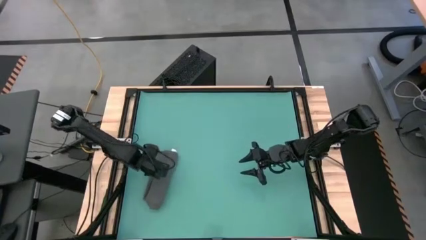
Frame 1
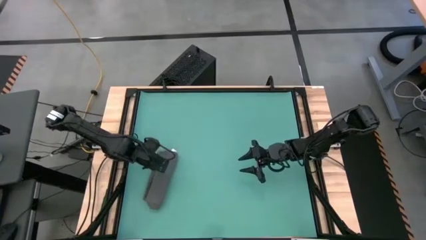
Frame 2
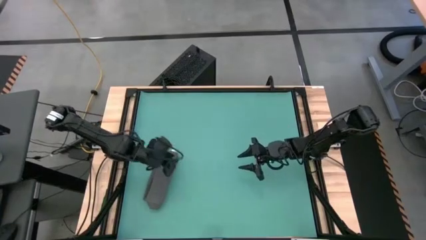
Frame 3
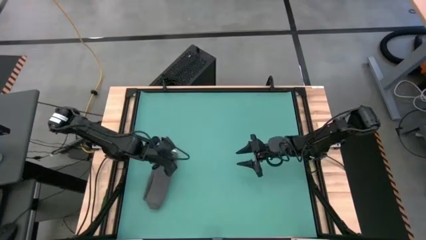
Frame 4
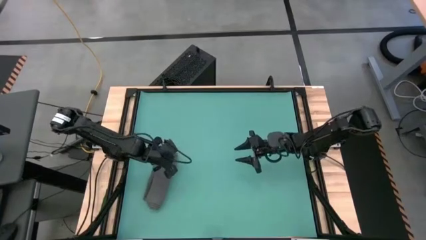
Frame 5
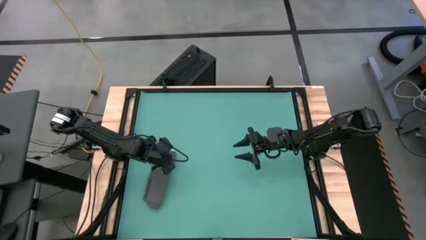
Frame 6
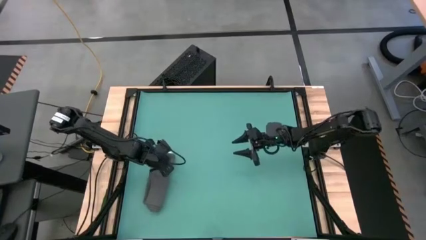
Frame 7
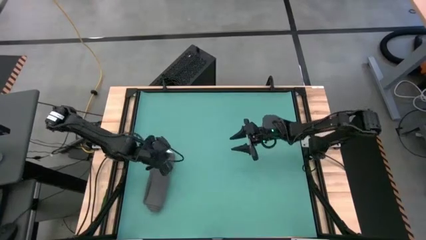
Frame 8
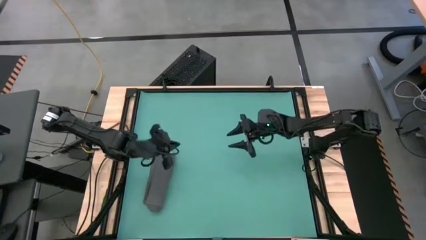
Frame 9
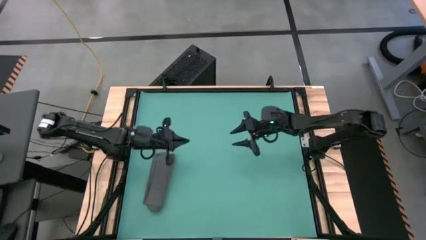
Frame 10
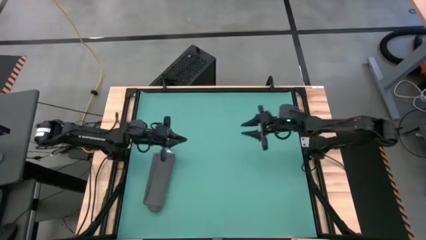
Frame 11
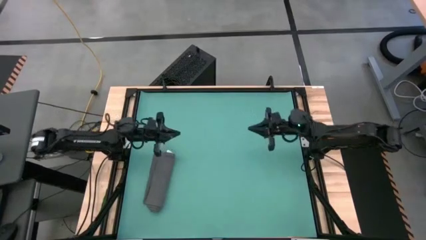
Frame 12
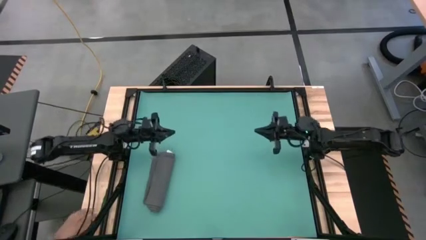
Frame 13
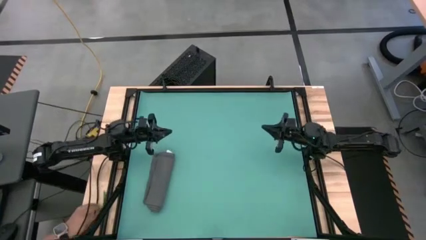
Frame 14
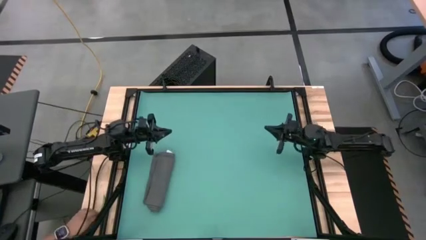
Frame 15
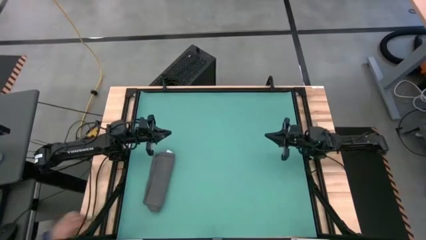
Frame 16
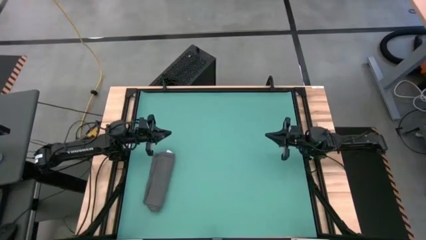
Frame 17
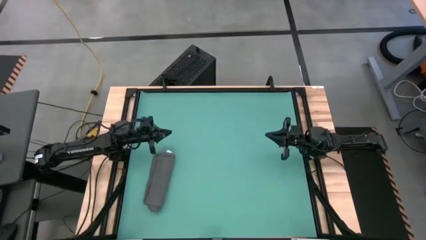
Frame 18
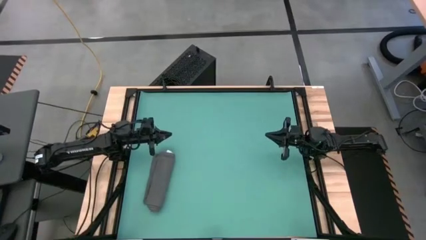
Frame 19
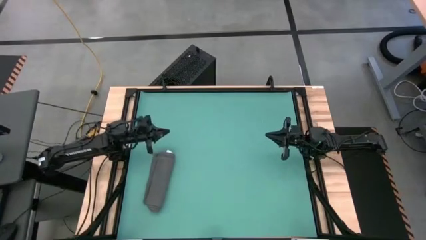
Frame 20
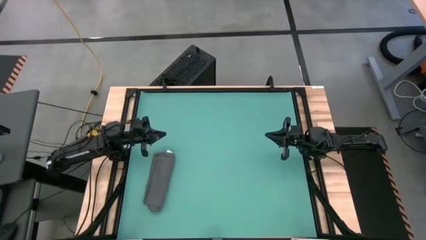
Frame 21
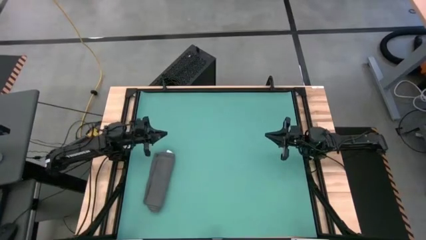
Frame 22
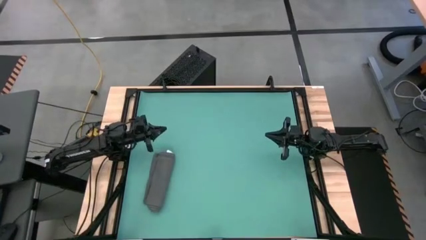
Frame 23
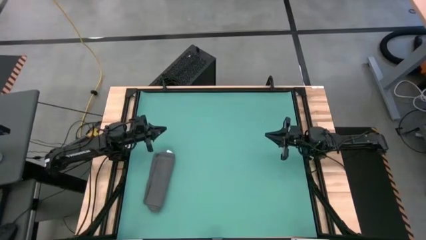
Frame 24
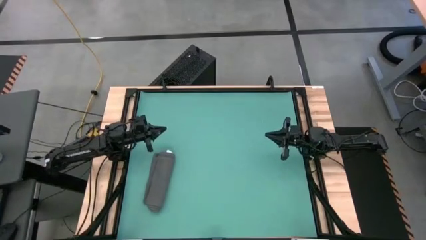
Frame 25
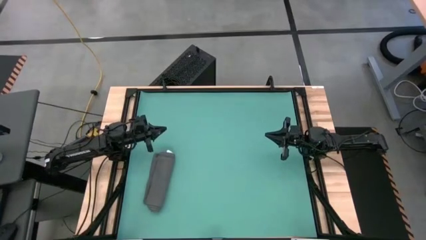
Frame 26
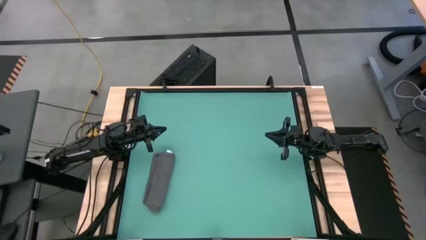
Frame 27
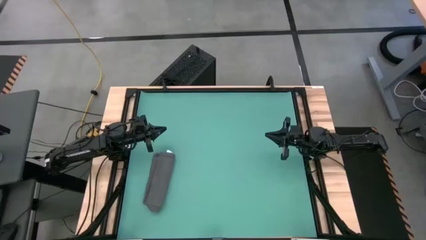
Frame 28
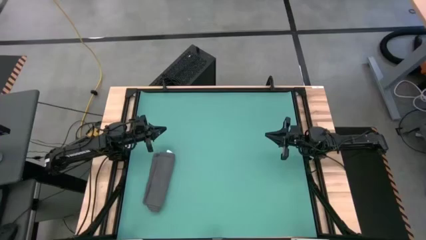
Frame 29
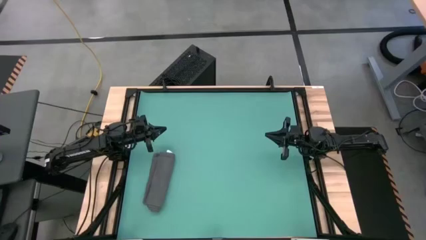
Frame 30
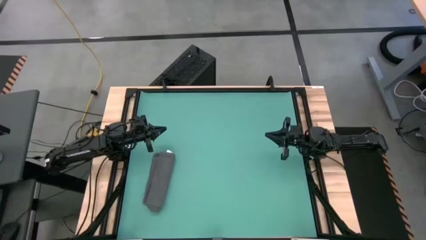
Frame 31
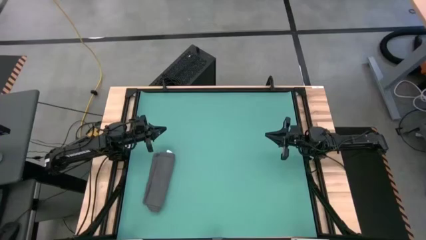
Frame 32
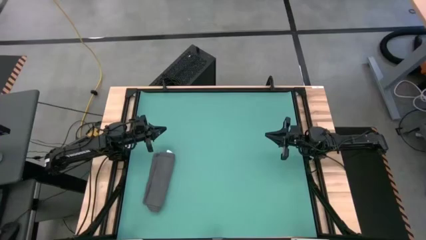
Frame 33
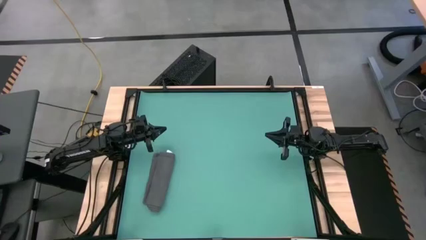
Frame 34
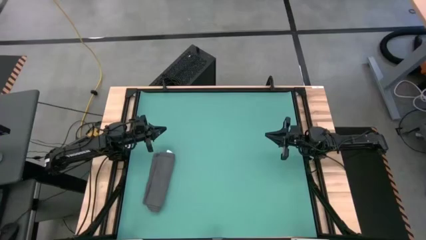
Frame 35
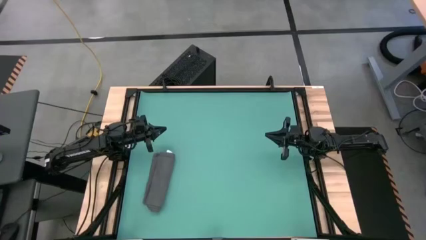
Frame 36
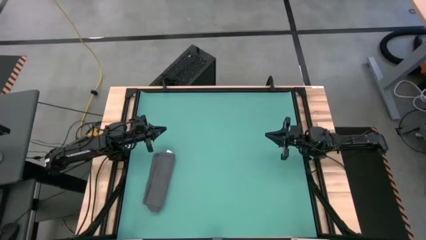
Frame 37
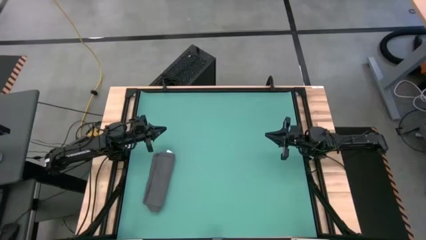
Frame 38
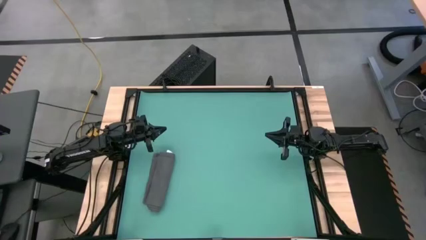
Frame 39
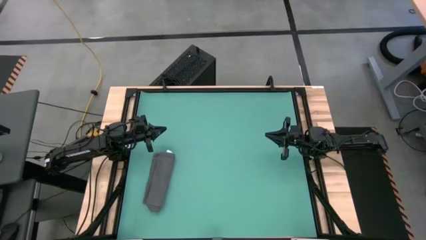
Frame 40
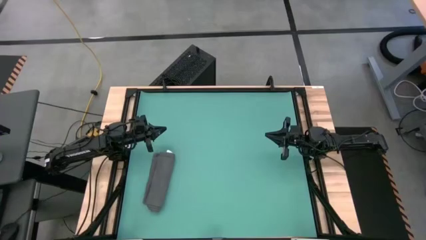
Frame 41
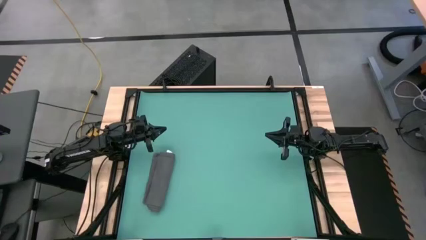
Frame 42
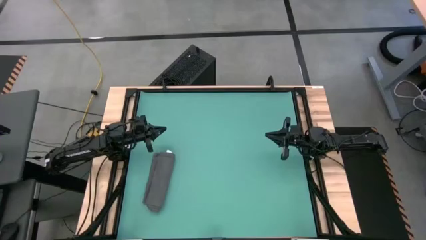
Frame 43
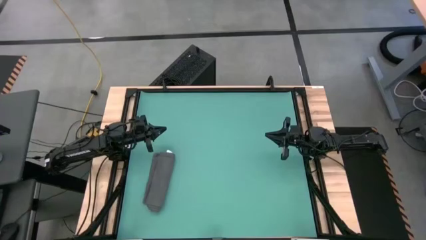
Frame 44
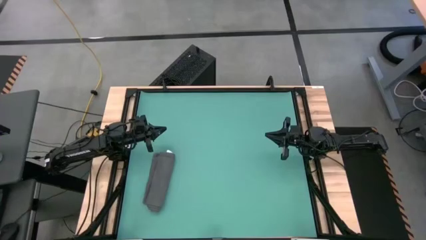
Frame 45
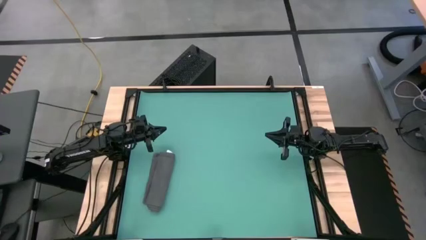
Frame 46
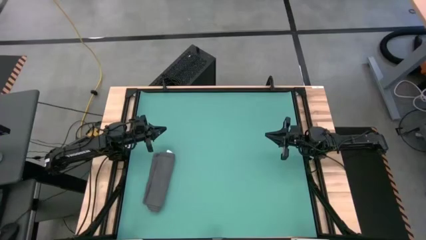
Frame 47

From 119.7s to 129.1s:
Task: Roll towel into tight, uniform cylinder
Return to Home Position

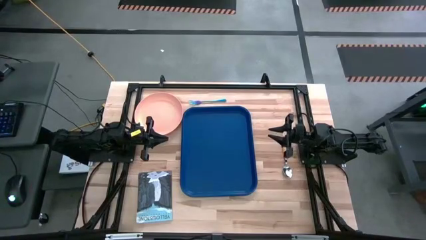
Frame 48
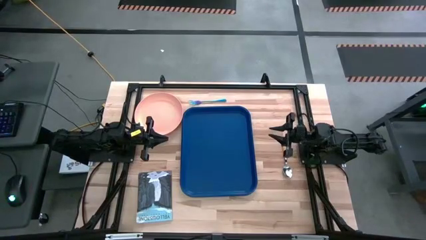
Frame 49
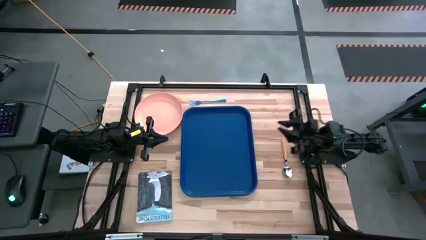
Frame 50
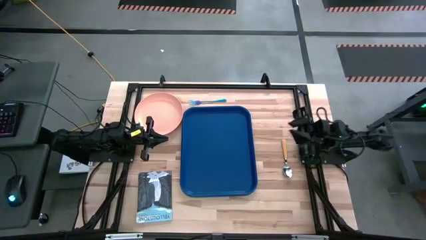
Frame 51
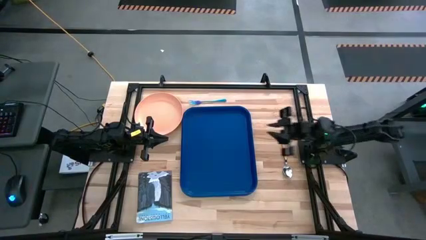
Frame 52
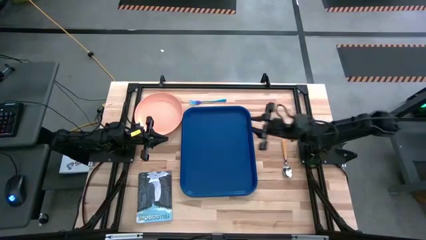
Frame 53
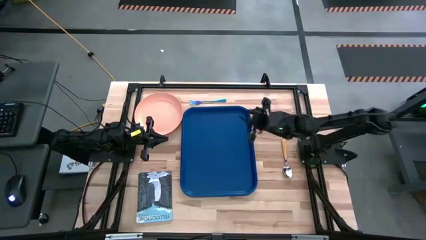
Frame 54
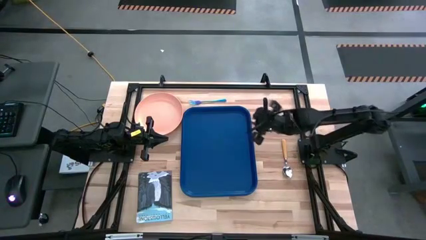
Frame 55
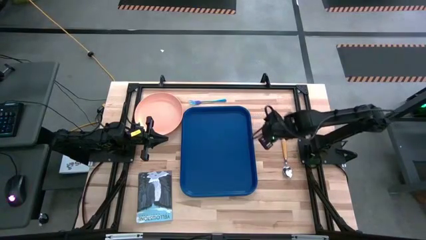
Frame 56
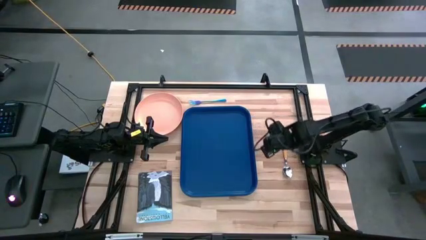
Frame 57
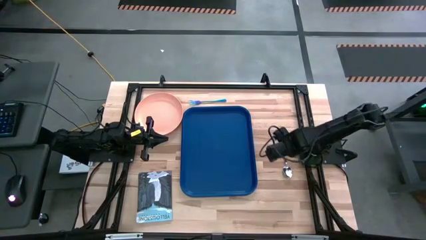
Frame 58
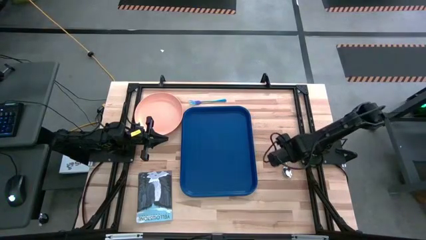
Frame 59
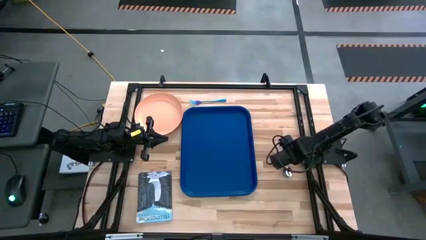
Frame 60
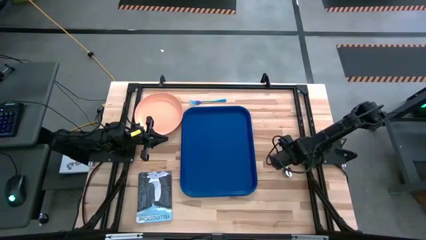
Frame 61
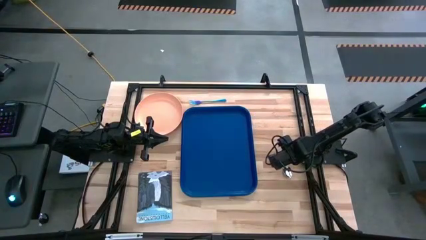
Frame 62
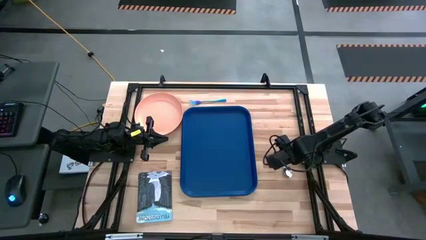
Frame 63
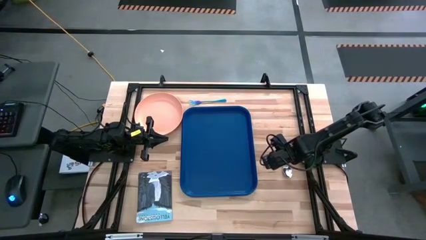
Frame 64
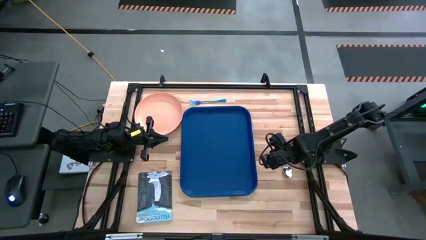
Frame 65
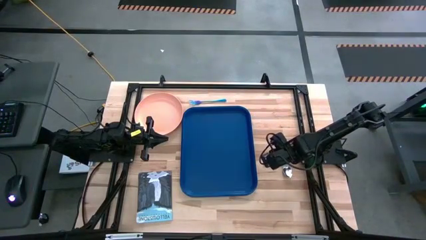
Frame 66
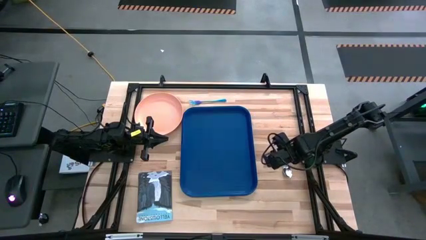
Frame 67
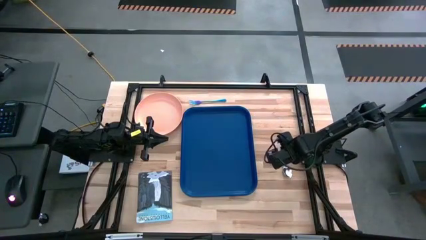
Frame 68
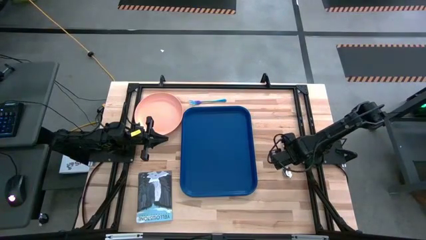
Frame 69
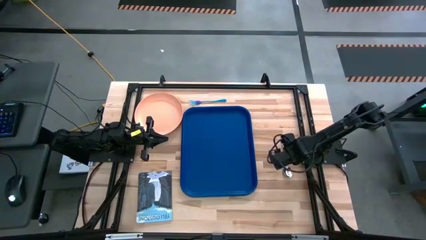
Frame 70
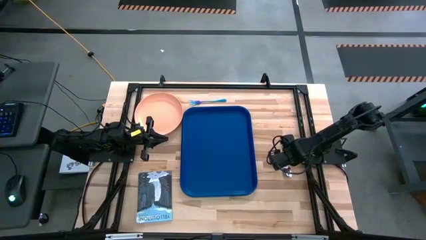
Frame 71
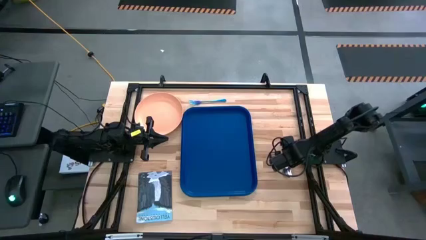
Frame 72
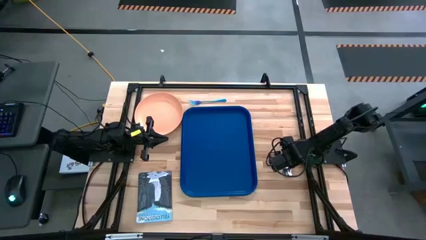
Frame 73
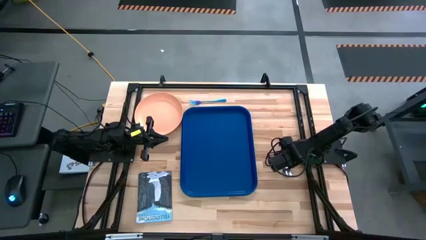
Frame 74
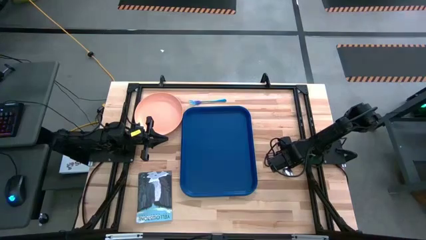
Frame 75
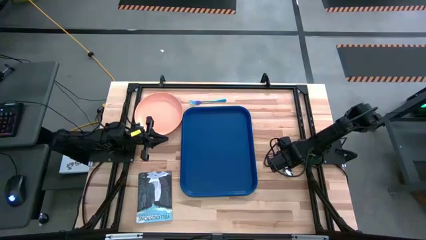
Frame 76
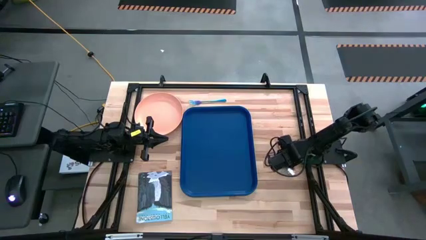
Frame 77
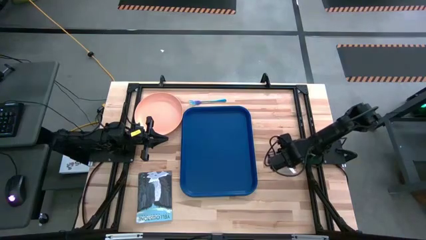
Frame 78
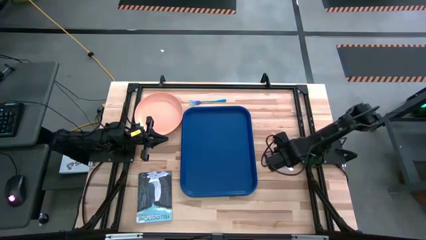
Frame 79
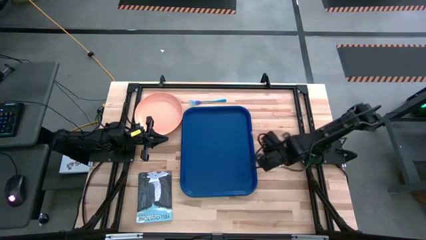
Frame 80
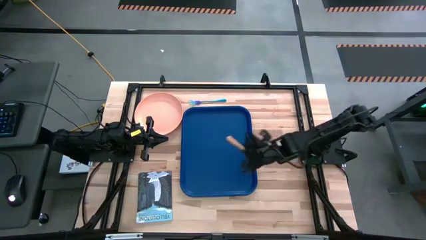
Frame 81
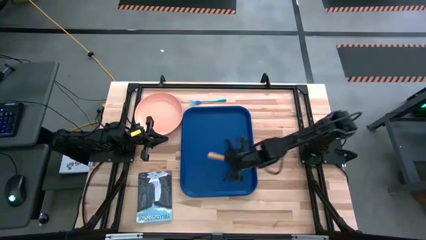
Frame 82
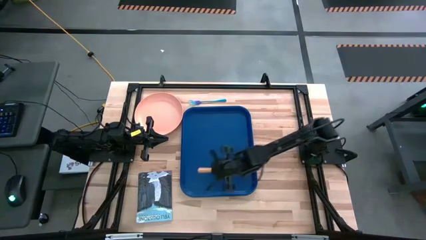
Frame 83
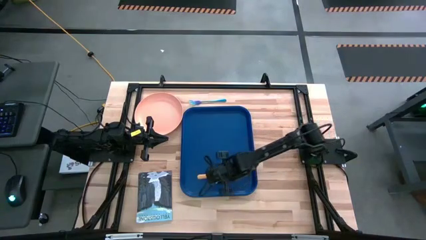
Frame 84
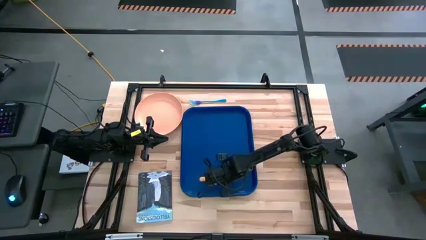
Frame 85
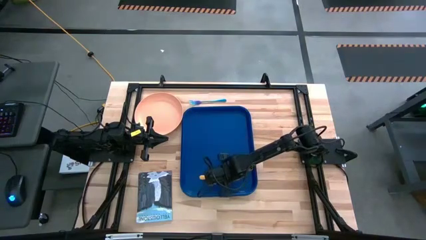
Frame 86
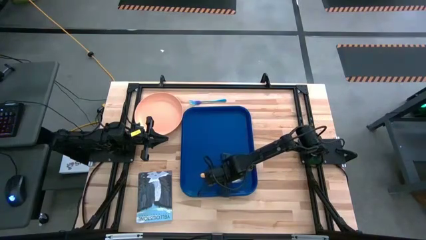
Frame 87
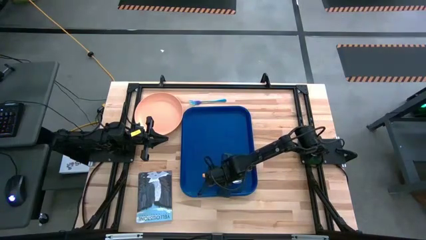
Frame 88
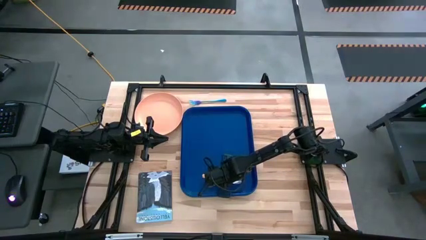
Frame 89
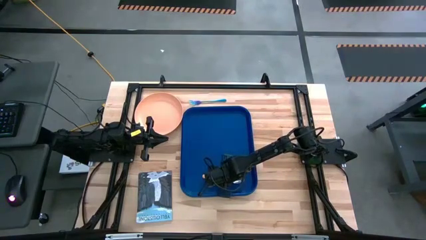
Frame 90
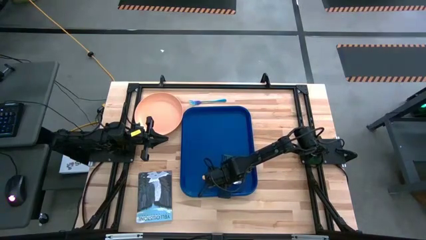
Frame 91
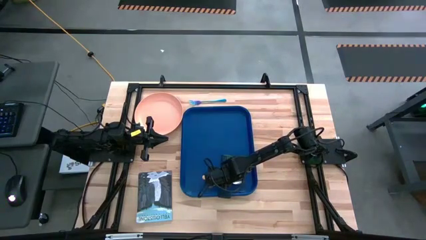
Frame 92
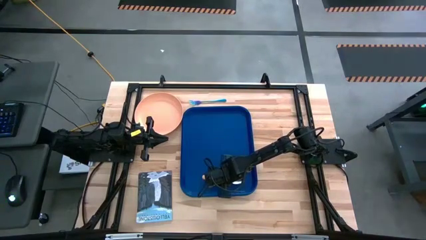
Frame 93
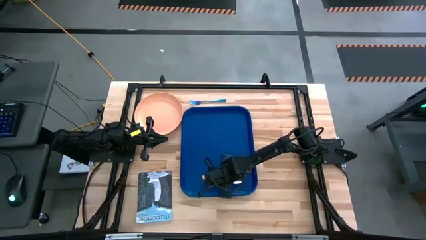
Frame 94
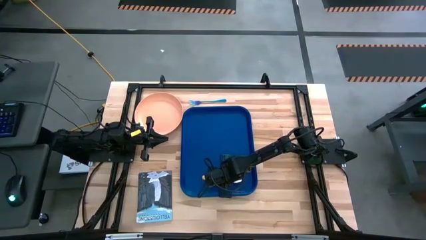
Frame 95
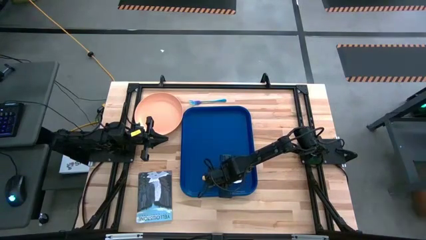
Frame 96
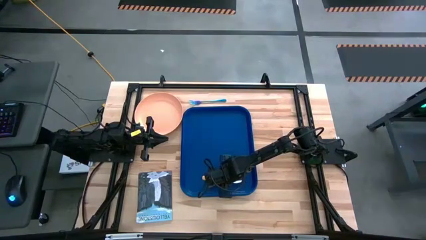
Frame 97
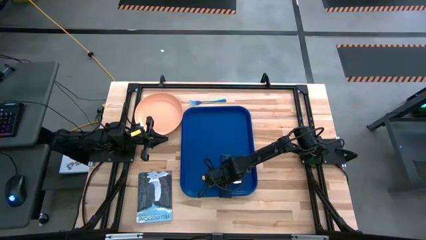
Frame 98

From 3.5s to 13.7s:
Task: Pick and place plate/cup/fork/spoon on tray
Put the yellow spoon on the blue serving tray
